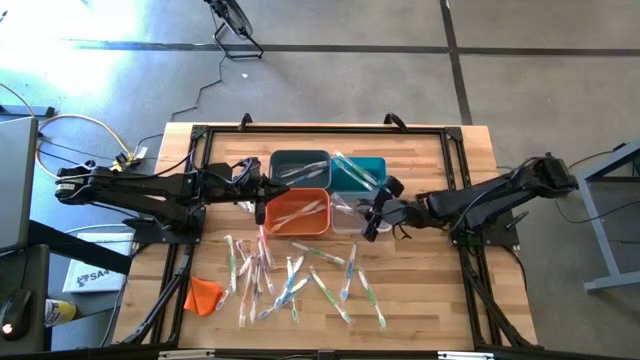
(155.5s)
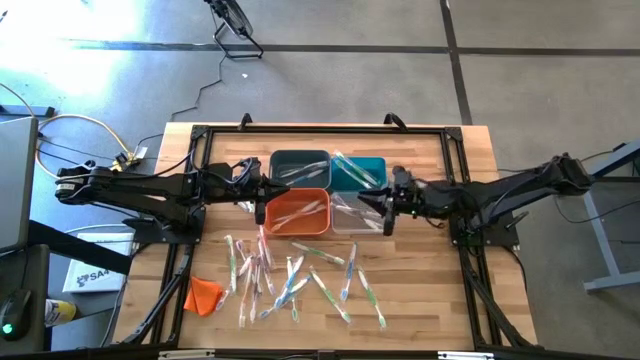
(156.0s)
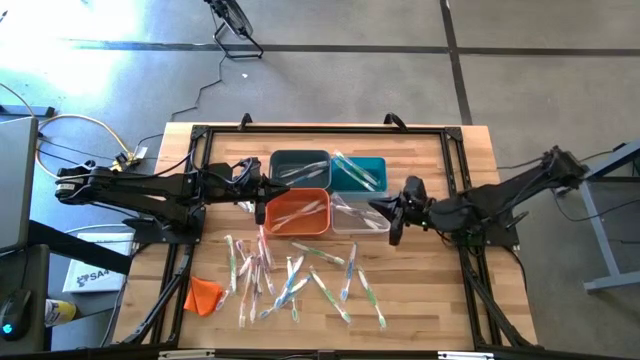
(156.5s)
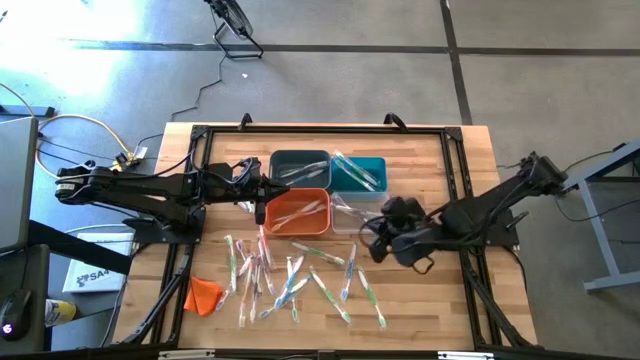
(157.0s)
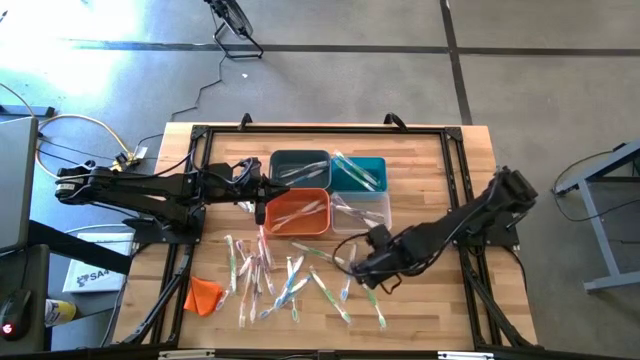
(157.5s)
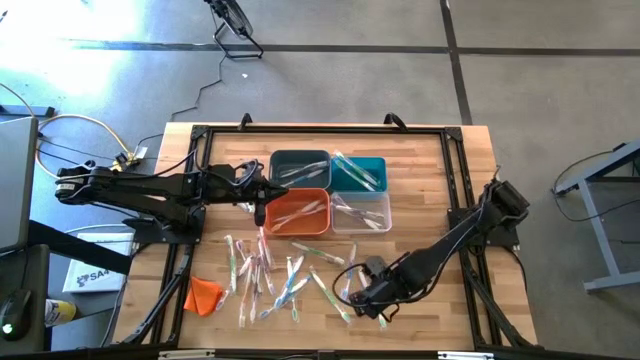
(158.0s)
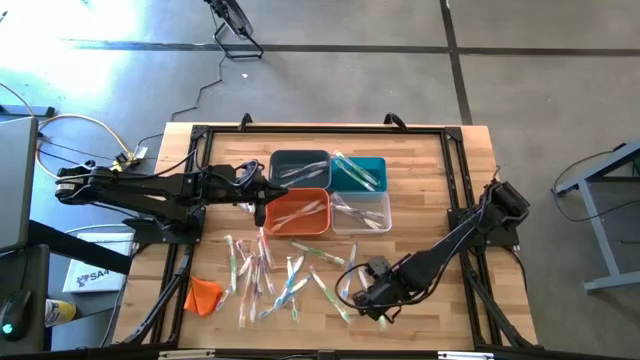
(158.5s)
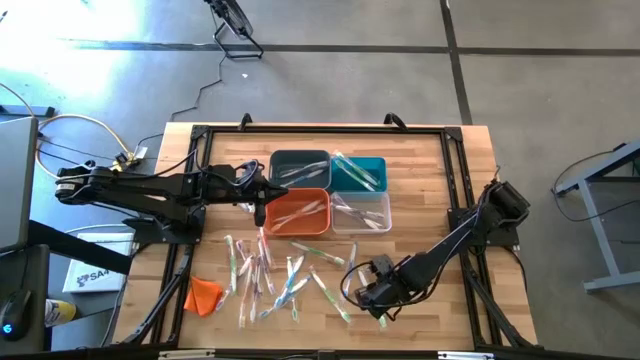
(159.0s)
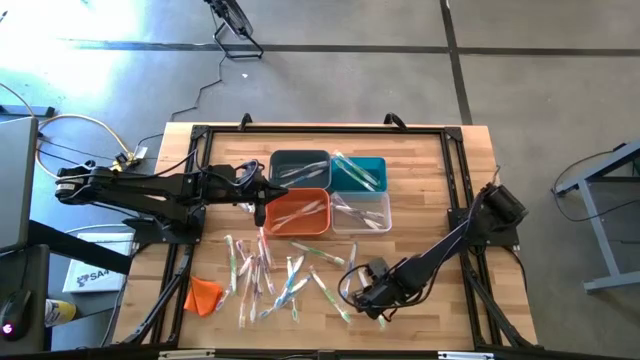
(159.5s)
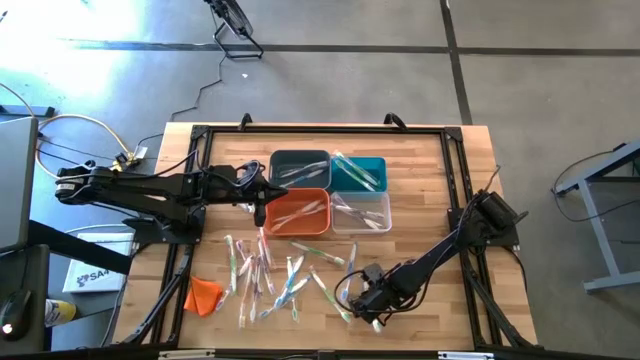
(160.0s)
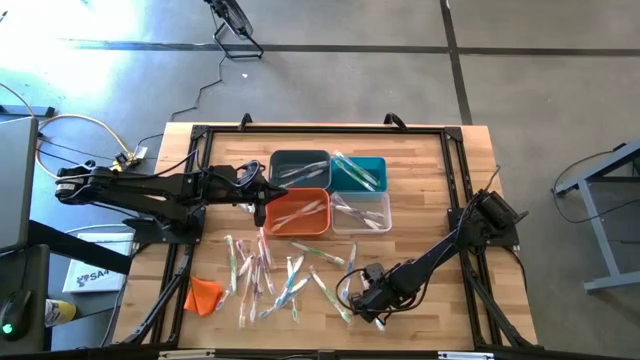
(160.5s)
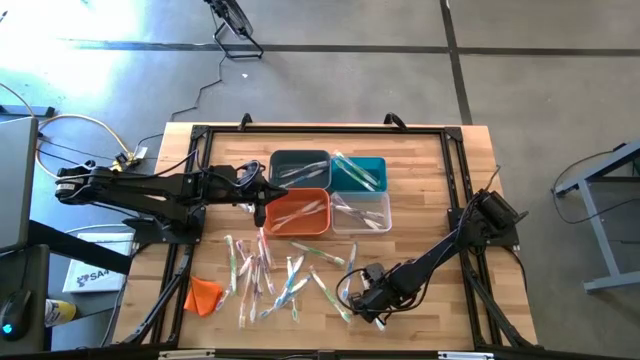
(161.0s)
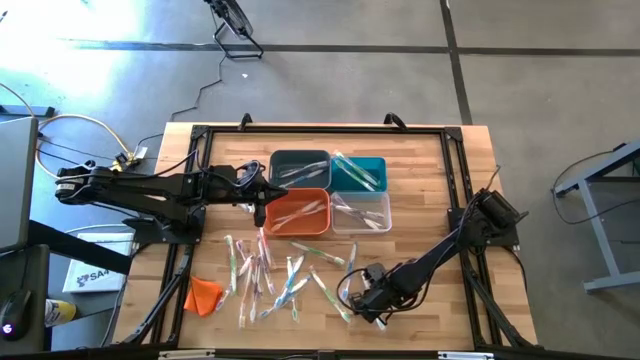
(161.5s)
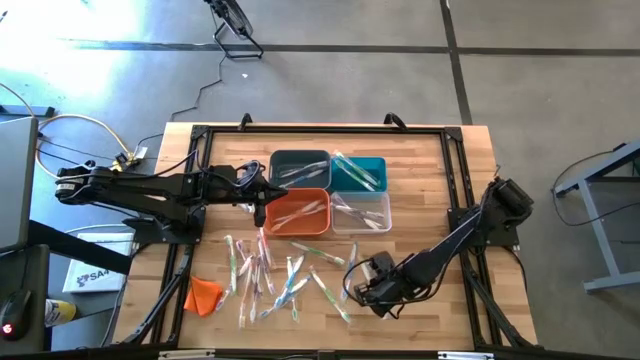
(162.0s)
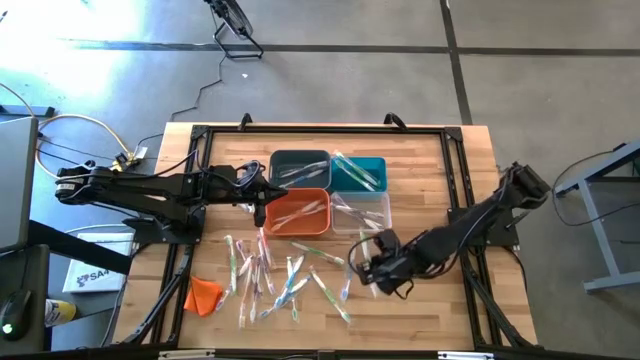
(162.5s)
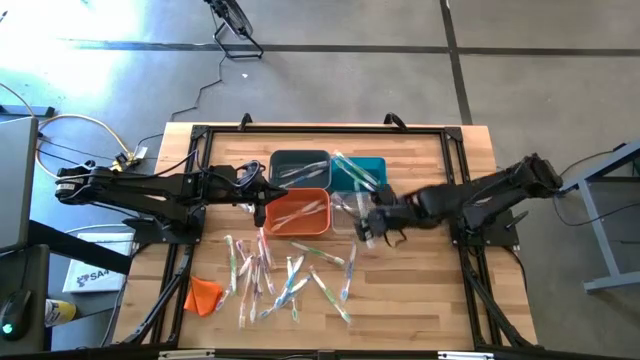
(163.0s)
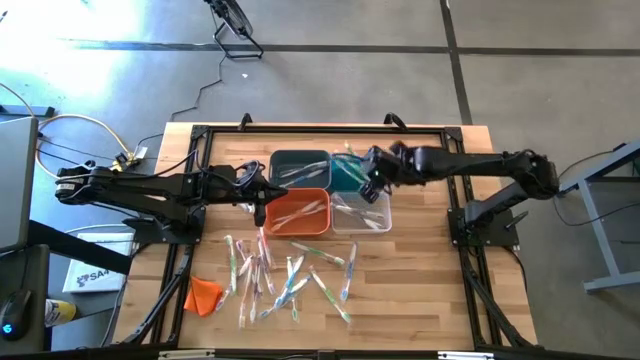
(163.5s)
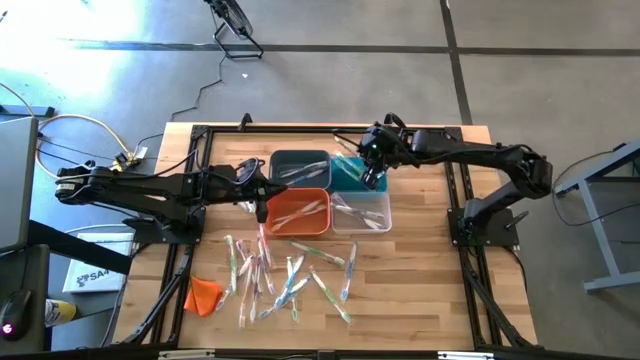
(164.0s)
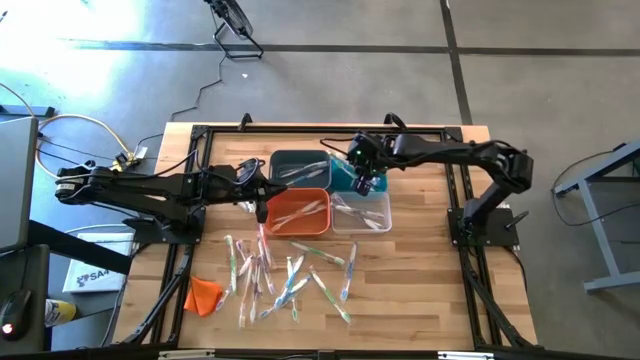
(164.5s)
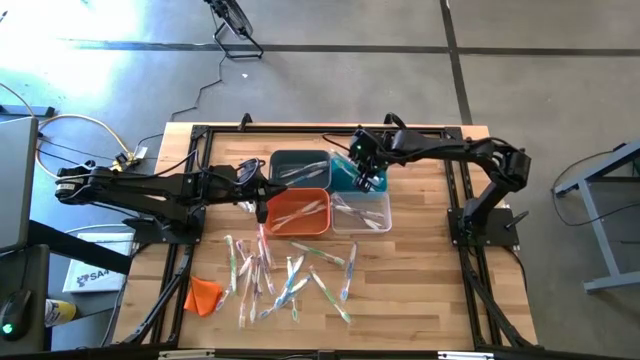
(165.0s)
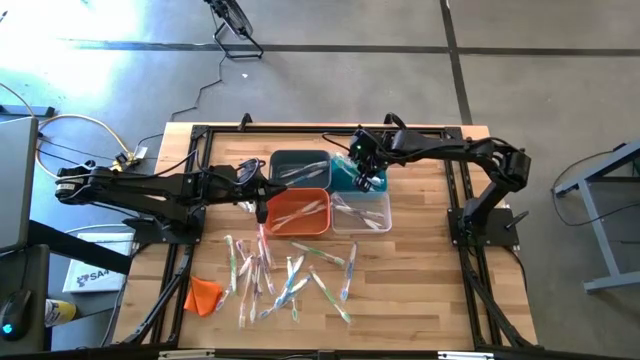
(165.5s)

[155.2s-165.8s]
Task: Pick & Place Toothbrushes
Put the green toothbrush into the right blue bin

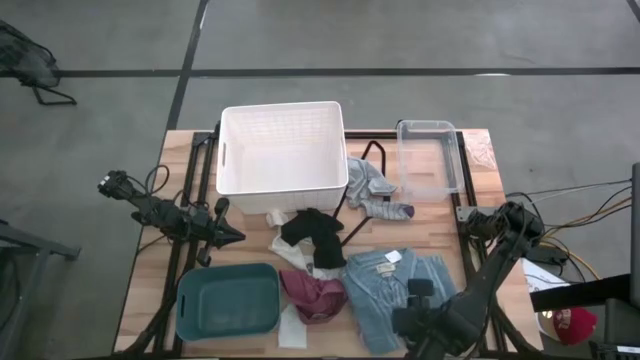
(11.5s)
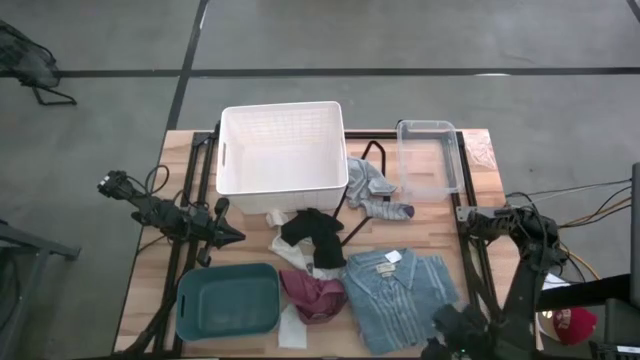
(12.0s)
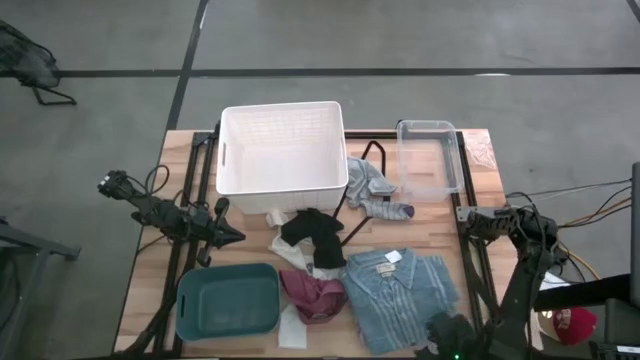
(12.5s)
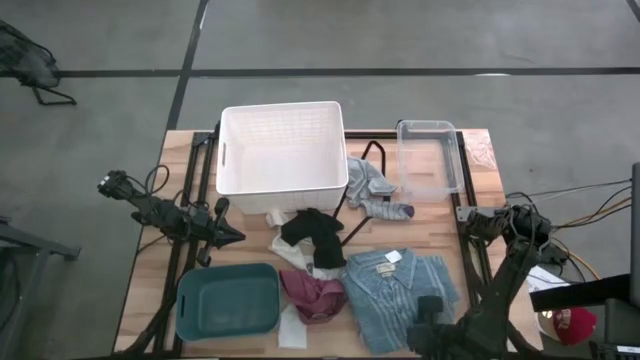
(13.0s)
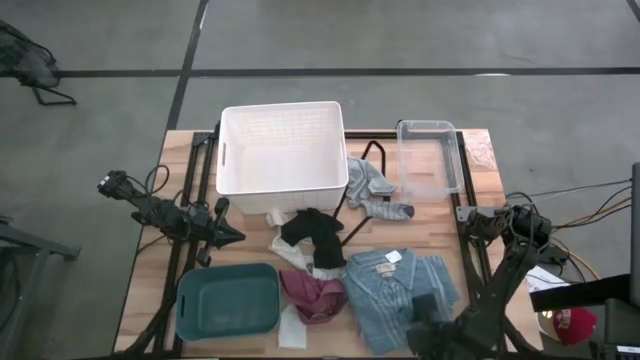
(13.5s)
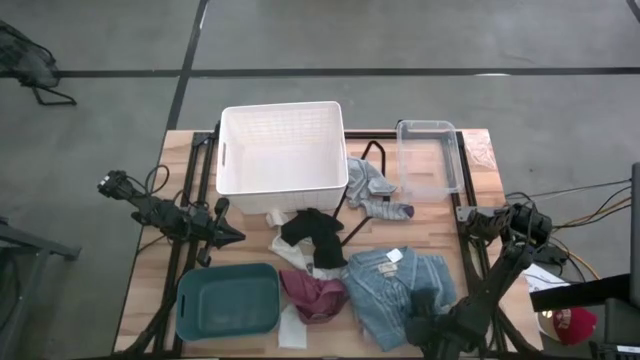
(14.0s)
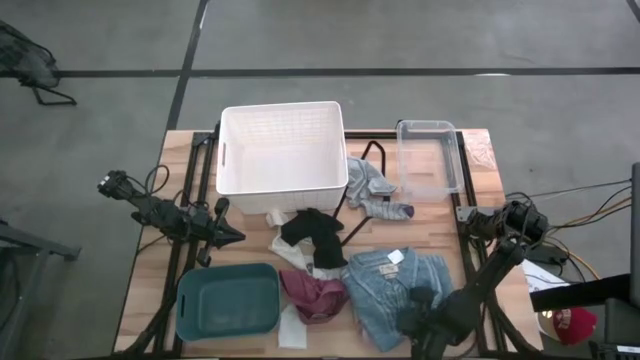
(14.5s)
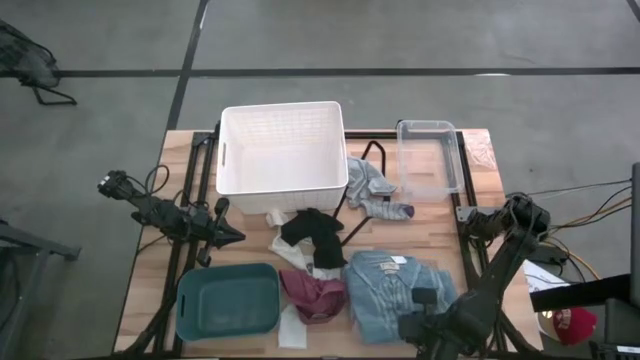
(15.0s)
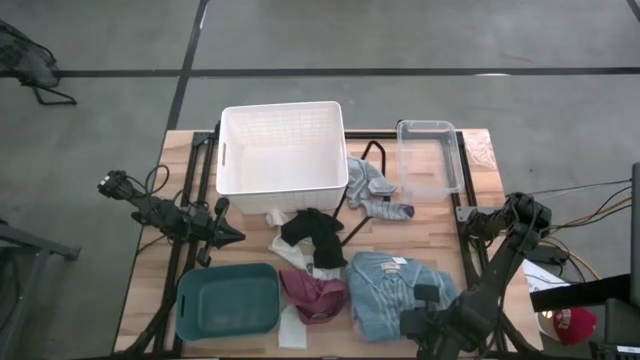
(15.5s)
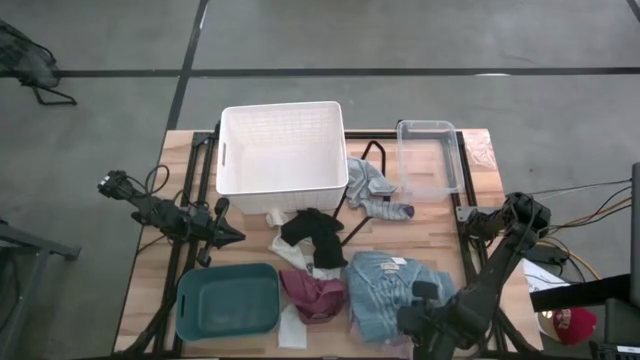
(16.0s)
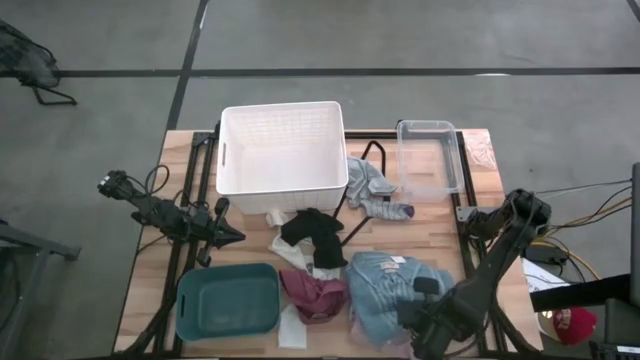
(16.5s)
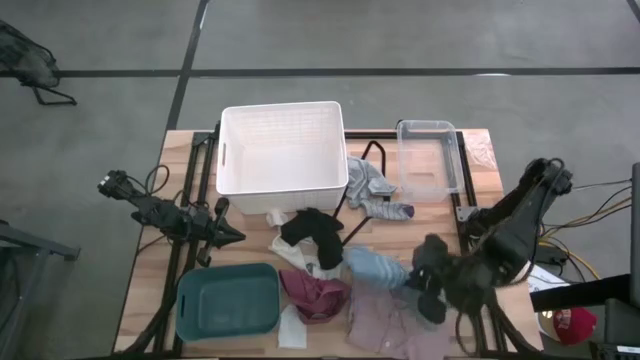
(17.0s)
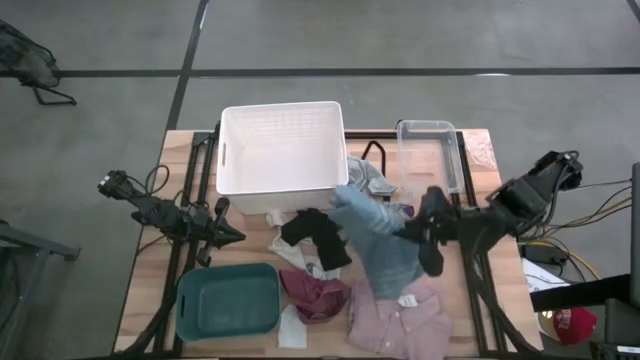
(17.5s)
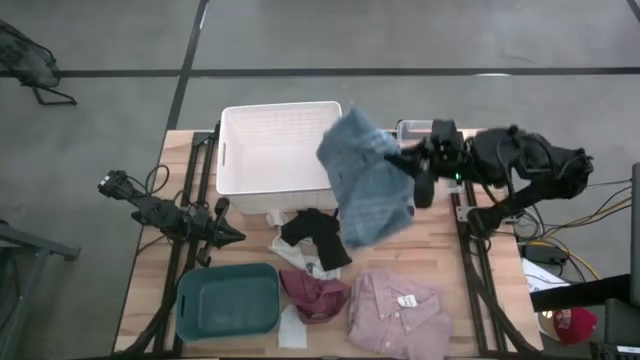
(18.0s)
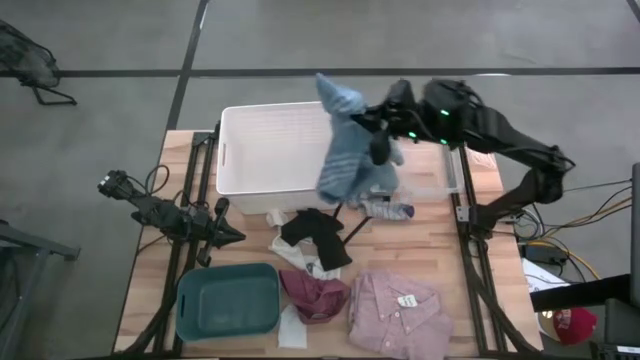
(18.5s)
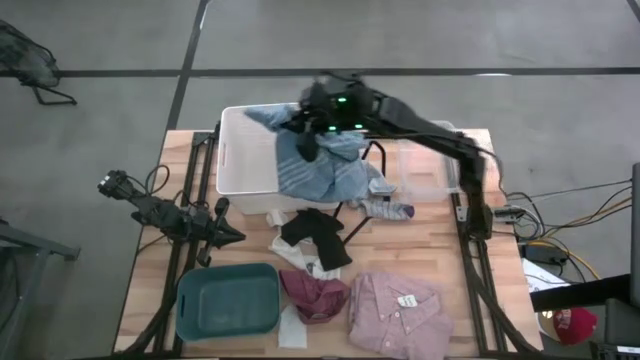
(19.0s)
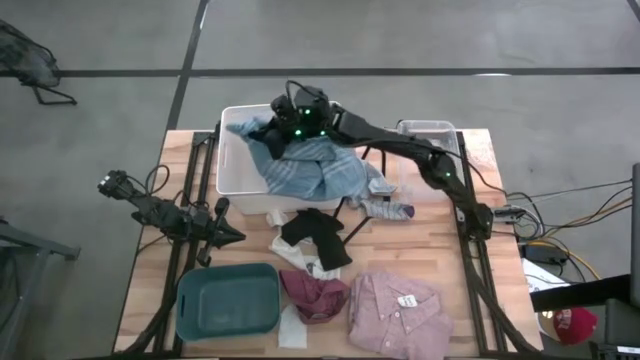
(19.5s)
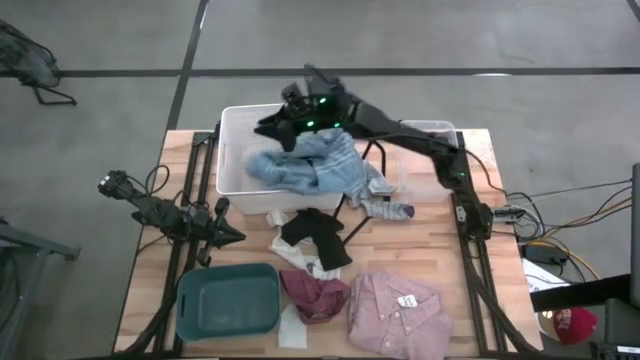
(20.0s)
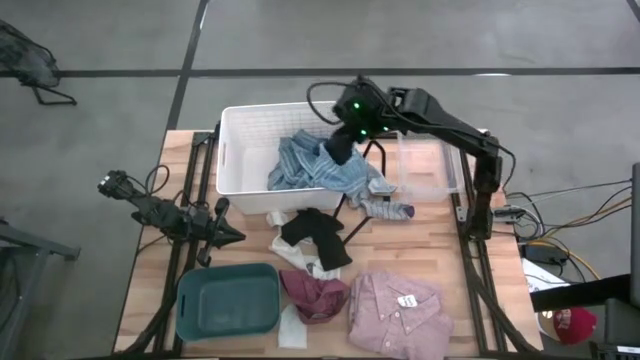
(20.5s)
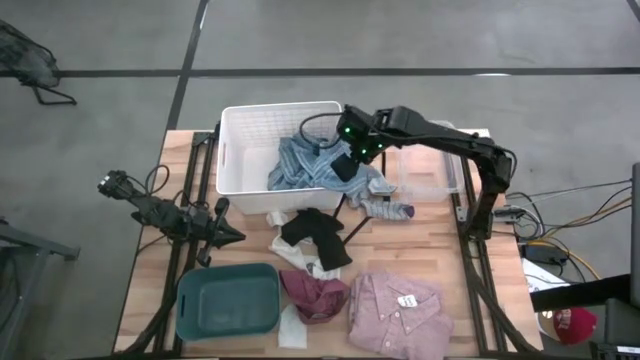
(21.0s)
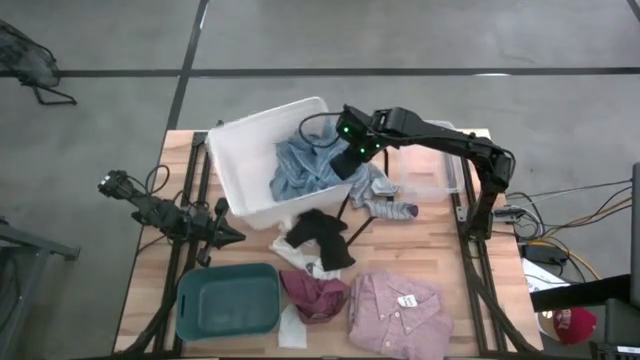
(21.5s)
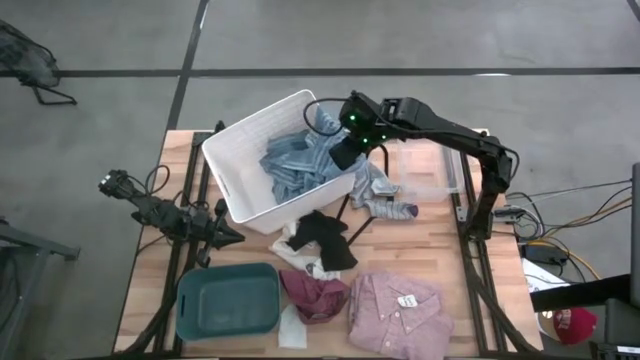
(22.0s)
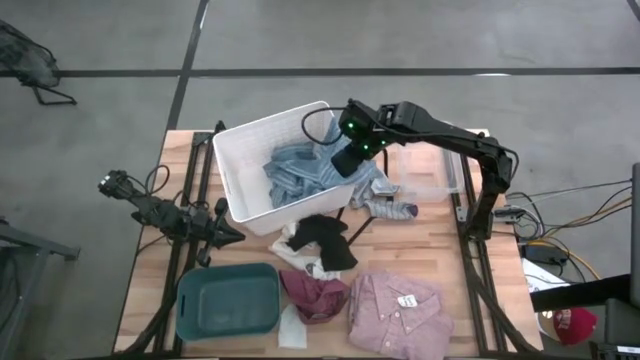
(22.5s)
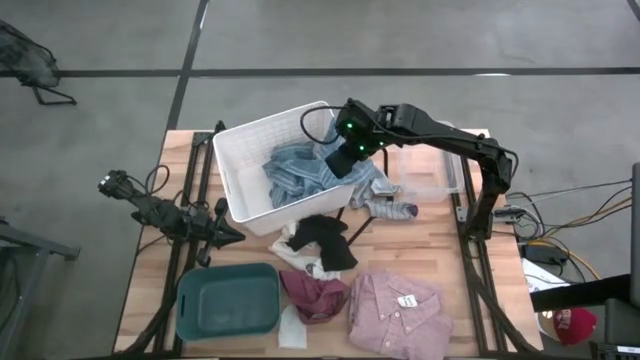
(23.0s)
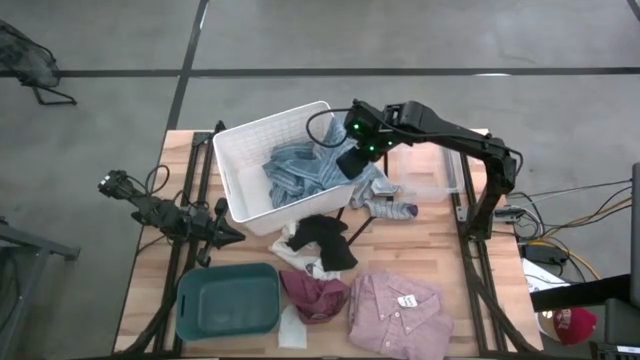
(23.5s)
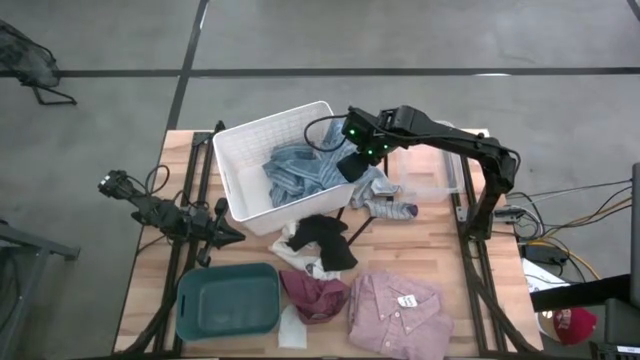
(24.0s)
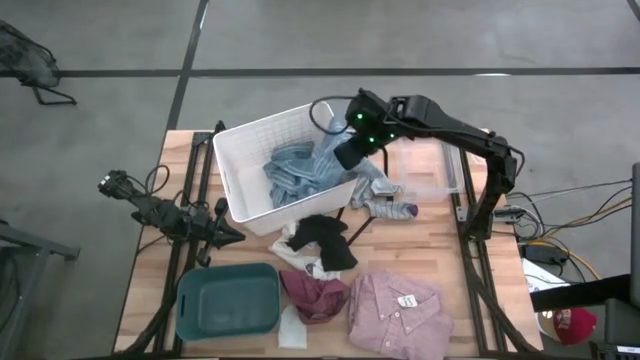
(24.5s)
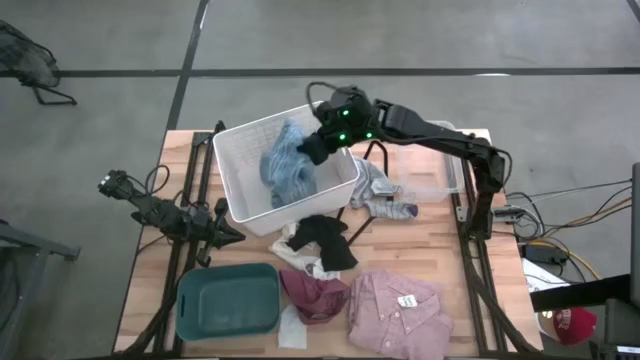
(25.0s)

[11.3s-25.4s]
Task: Pick & Place Cloths
Put the blue polo shirt into the white bin
